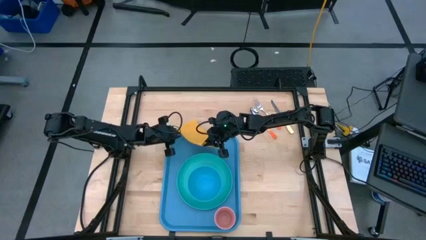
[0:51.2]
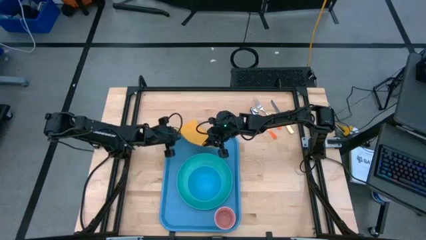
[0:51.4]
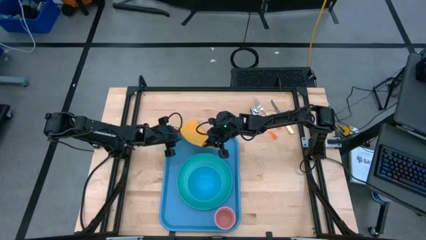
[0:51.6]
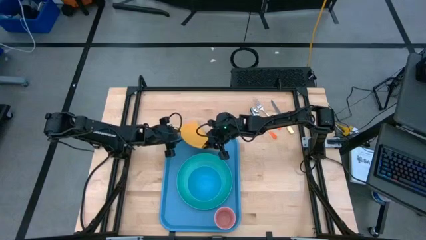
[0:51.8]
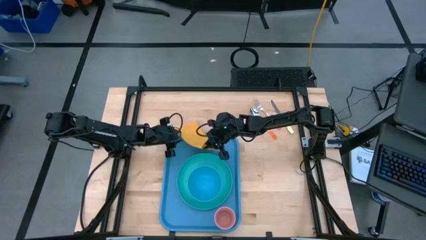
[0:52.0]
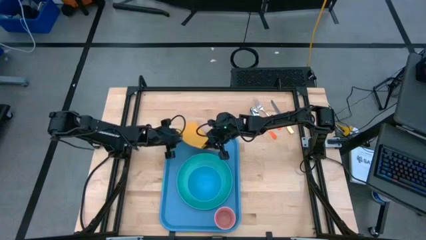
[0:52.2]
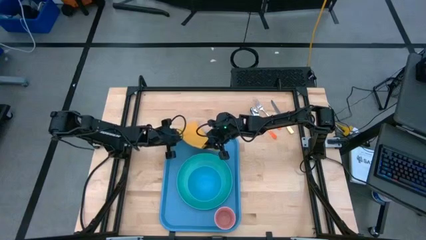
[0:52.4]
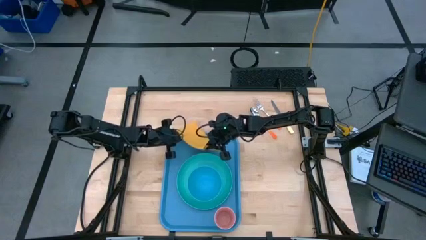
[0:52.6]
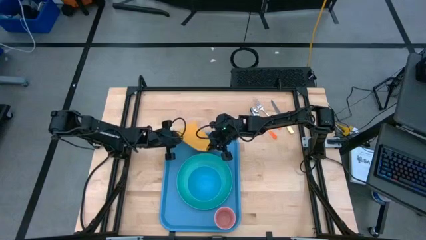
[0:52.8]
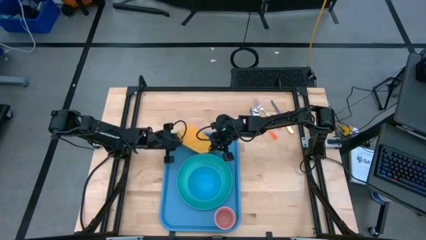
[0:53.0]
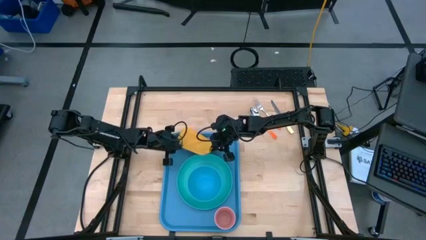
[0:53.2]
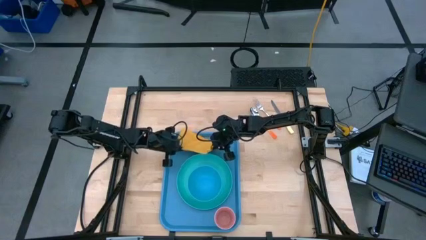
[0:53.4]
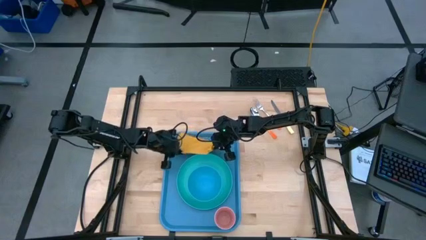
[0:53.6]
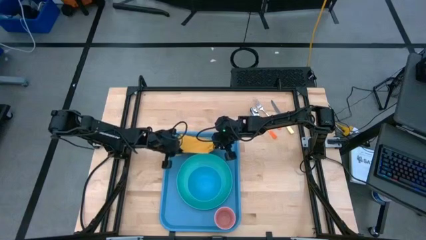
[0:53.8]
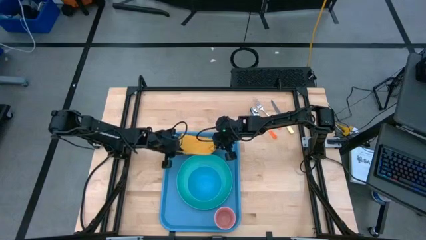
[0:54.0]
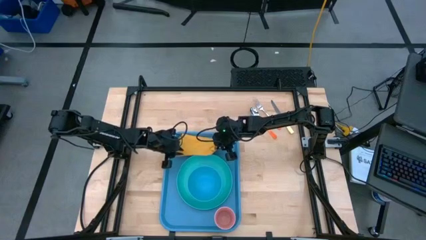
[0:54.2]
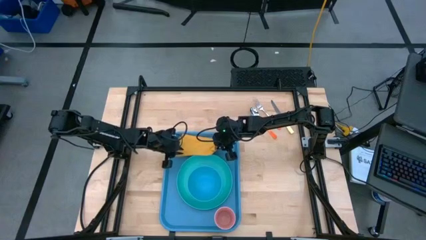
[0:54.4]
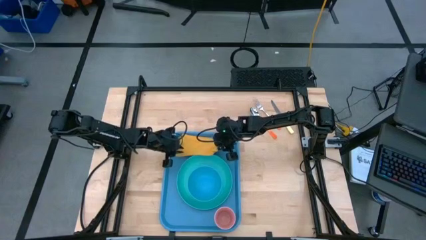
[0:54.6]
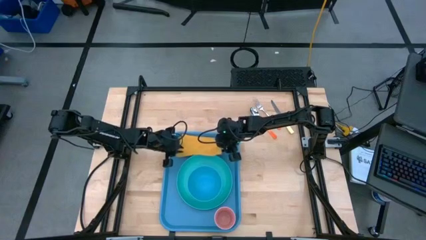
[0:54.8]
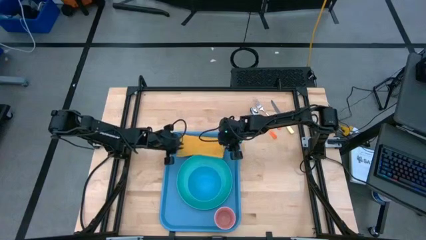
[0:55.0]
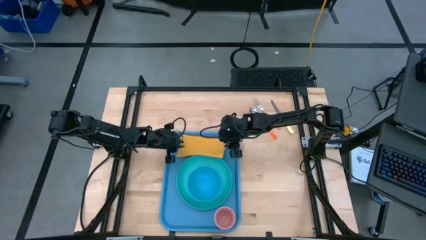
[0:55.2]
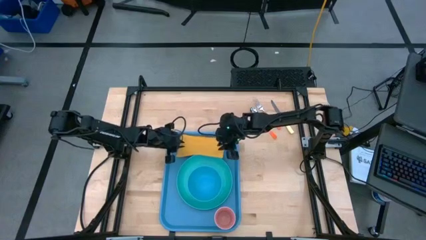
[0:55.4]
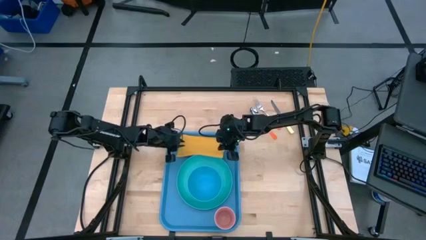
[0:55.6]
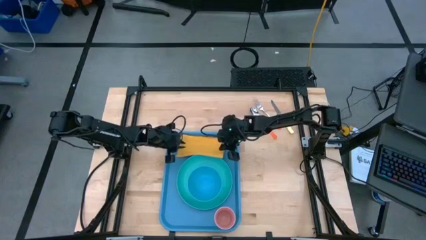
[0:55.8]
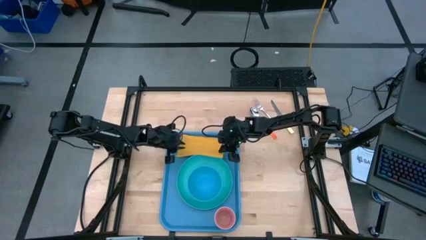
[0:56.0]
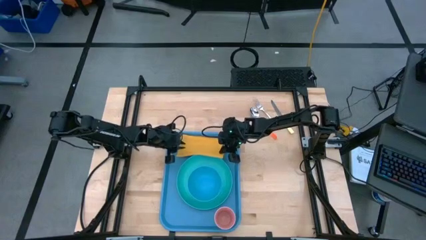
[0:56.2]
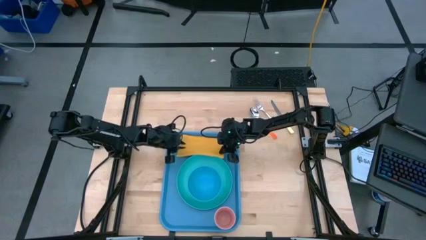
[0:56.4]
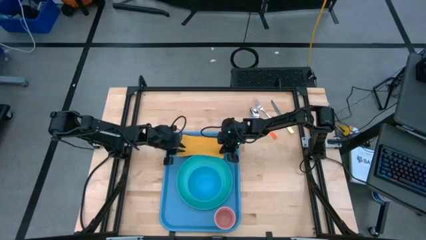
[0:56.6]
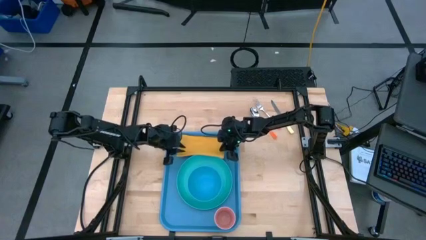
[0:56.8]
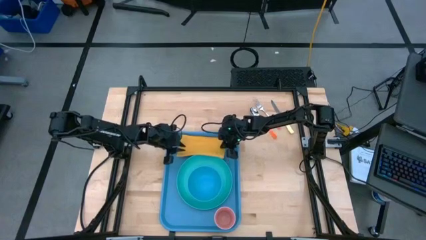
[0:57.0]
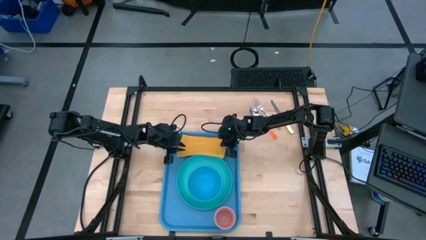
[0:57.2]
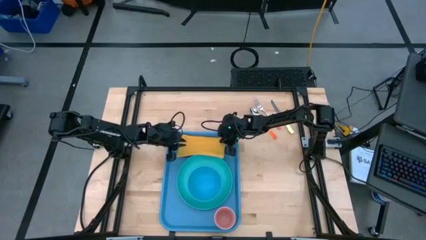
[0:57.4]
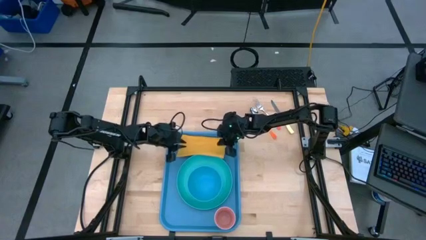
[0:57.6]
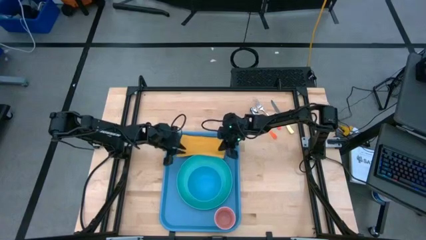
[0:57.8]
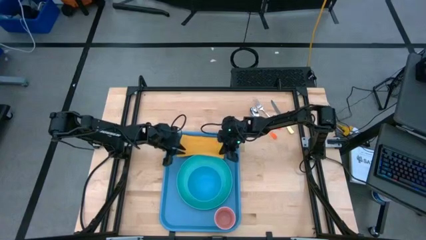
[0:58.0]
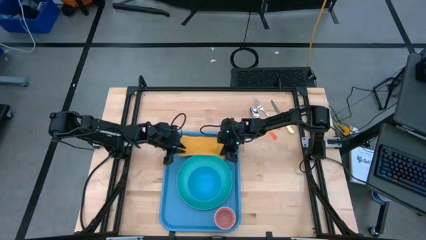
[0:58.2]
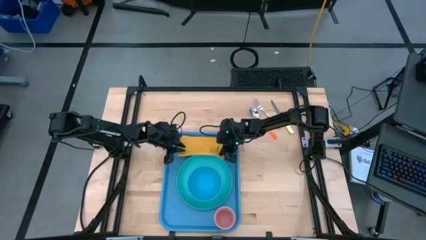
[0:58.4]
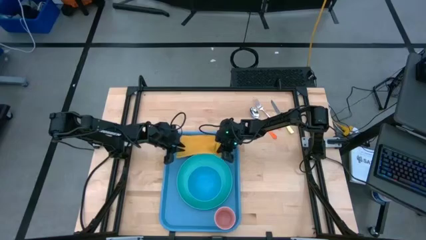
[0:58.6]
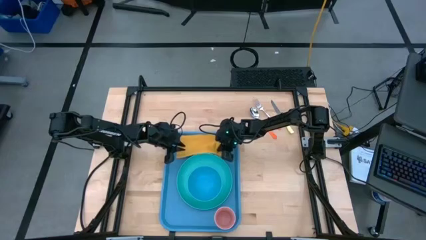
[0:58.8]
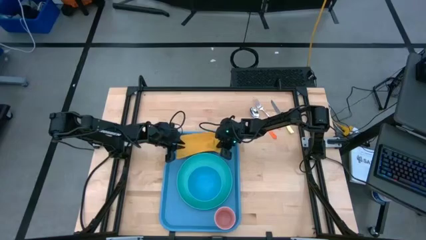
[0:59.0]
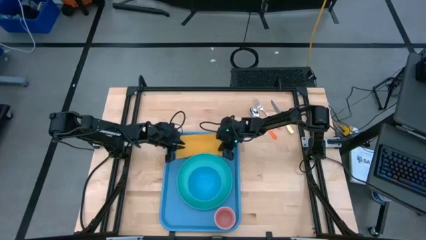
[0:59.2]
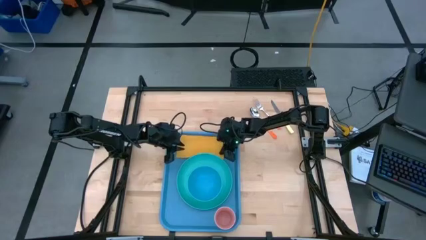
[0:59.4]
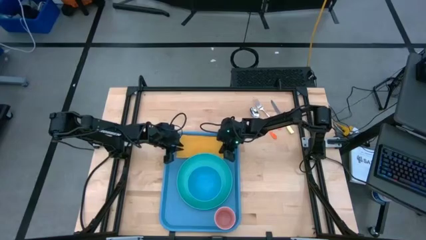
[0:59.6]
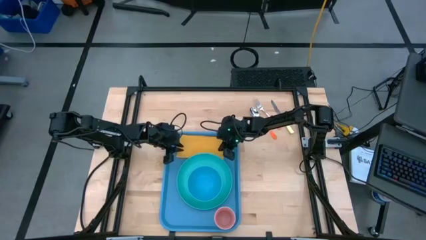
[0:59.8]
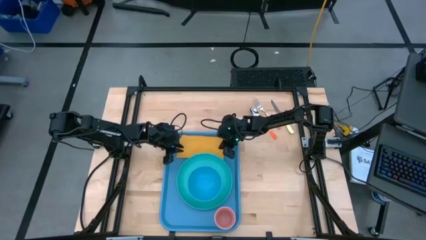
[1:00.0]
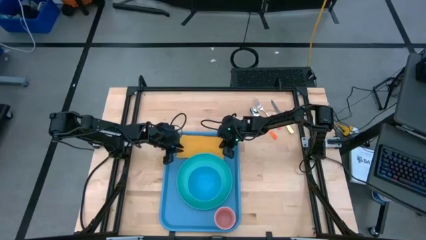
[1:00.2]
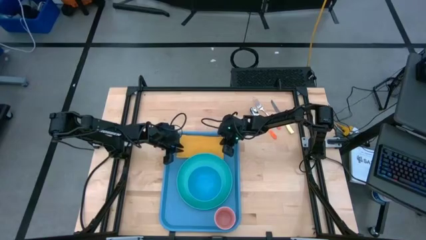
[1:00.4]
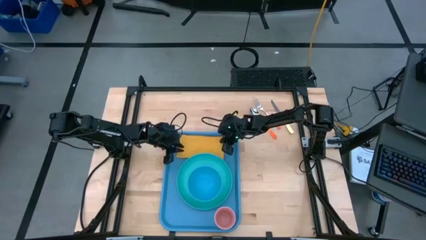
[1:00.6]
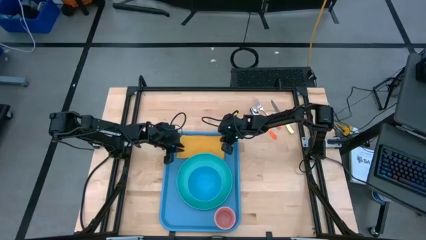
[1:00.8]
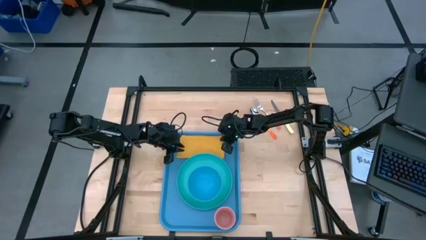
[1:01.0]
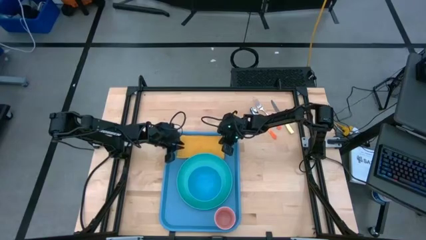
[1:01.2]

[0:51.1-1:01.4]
Task: Set up tray
Put the orange napkin on the blue tray to the top of the light blue plate

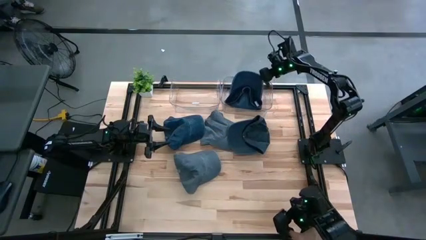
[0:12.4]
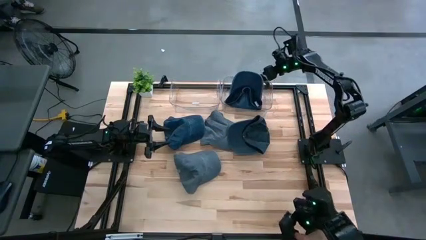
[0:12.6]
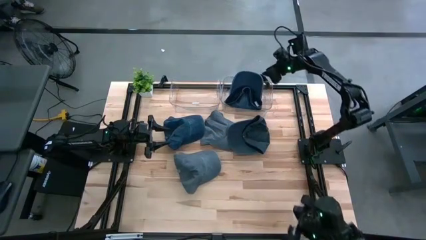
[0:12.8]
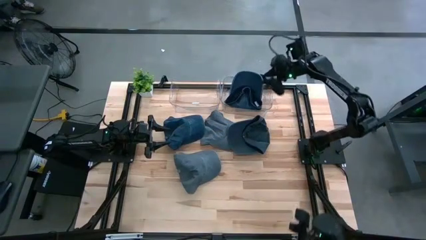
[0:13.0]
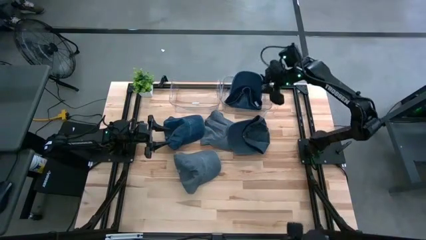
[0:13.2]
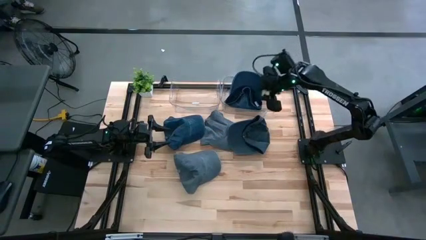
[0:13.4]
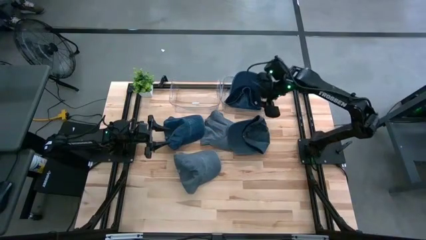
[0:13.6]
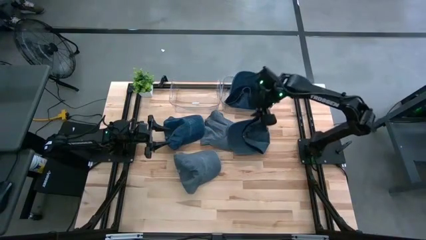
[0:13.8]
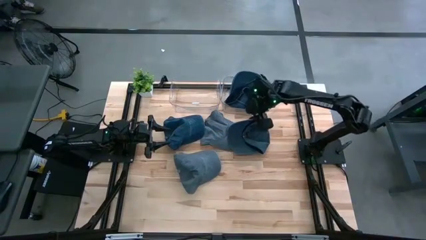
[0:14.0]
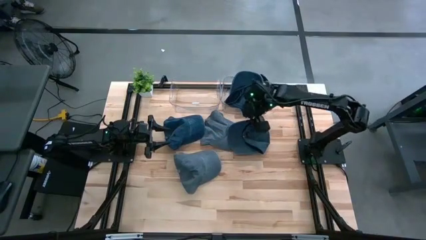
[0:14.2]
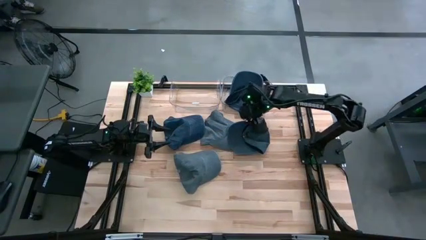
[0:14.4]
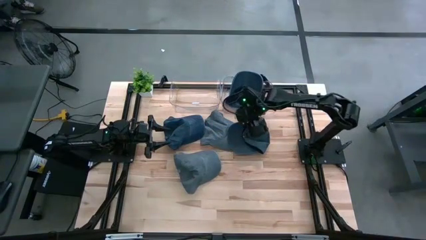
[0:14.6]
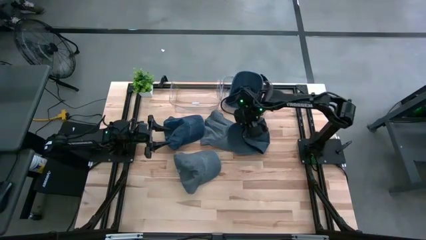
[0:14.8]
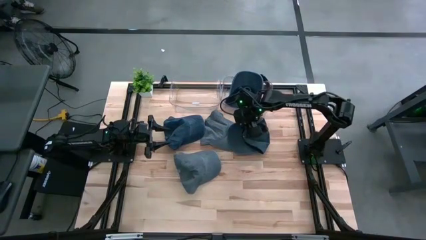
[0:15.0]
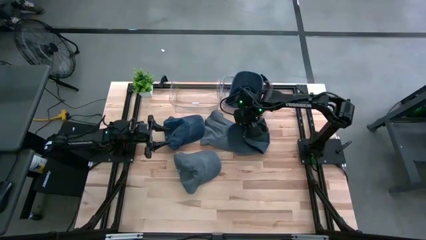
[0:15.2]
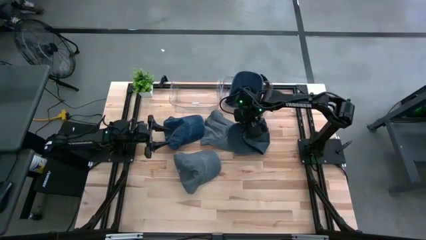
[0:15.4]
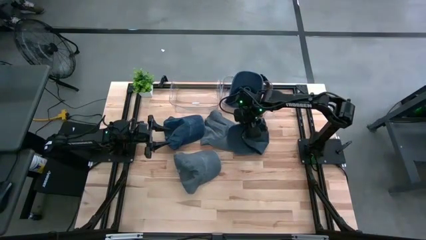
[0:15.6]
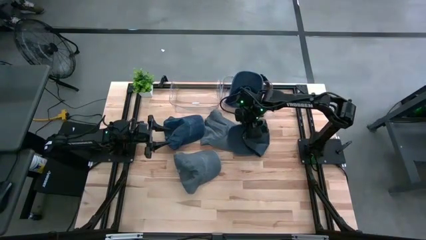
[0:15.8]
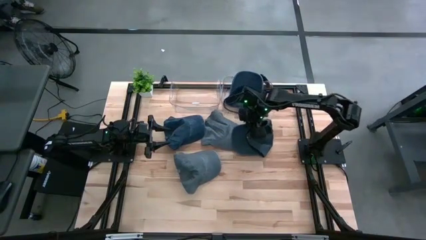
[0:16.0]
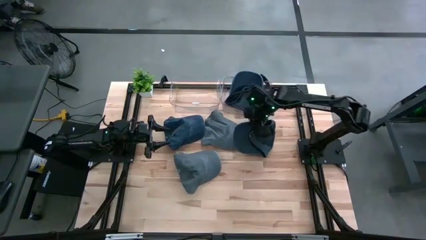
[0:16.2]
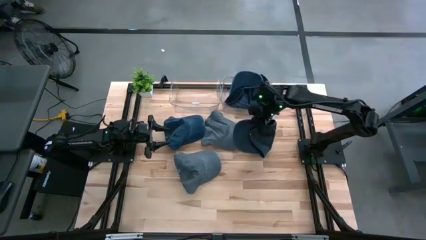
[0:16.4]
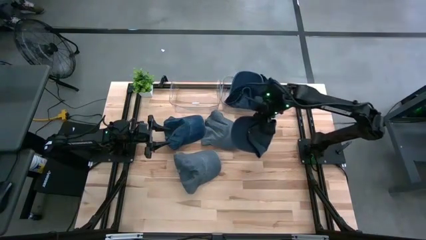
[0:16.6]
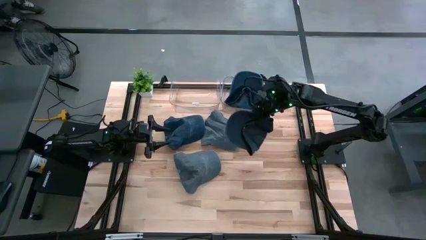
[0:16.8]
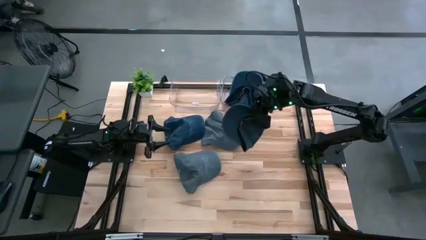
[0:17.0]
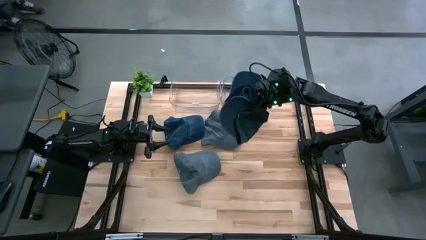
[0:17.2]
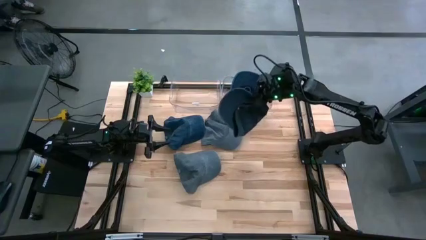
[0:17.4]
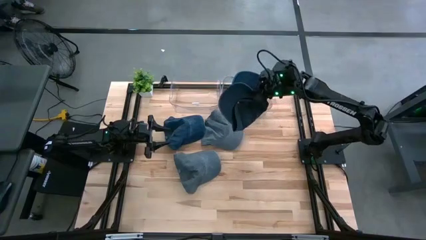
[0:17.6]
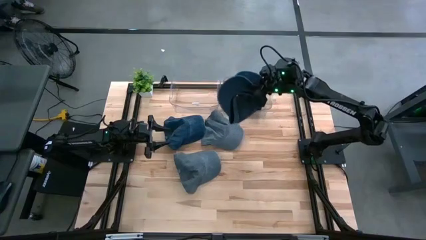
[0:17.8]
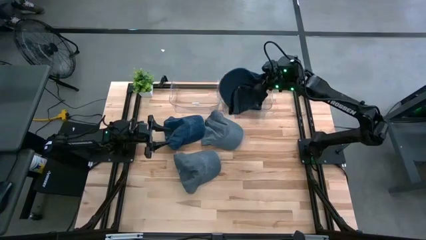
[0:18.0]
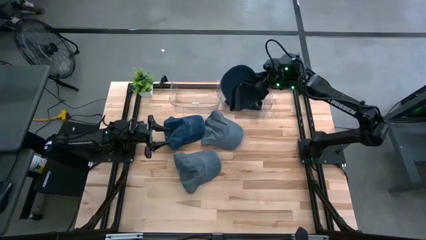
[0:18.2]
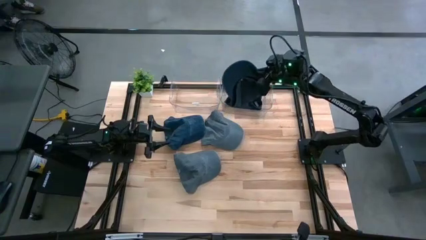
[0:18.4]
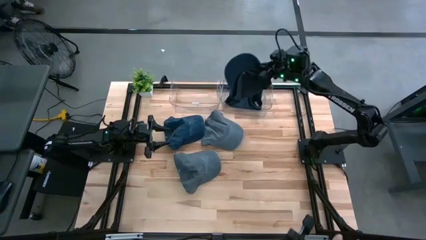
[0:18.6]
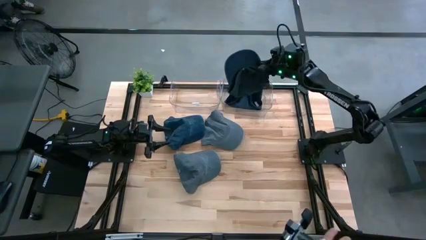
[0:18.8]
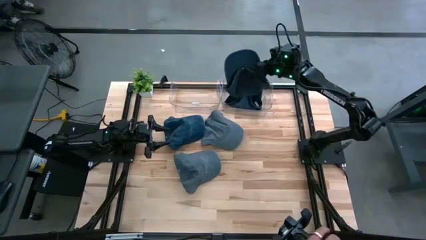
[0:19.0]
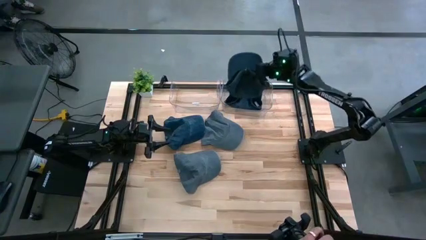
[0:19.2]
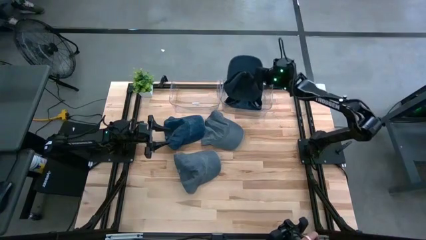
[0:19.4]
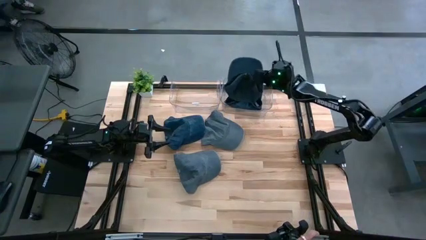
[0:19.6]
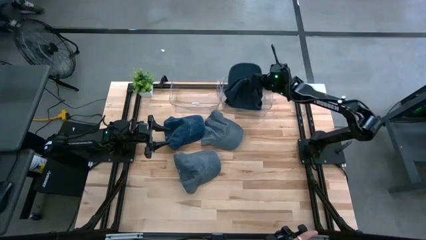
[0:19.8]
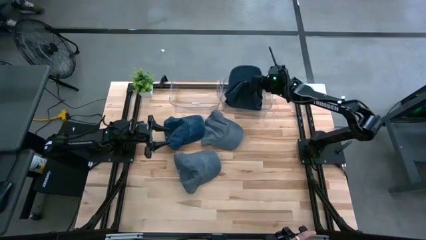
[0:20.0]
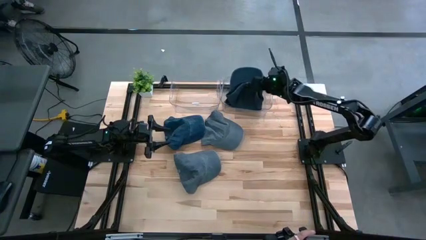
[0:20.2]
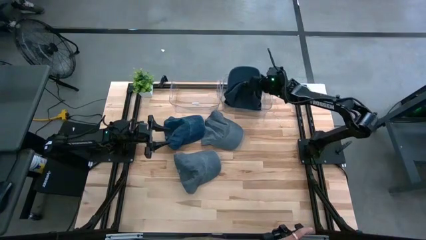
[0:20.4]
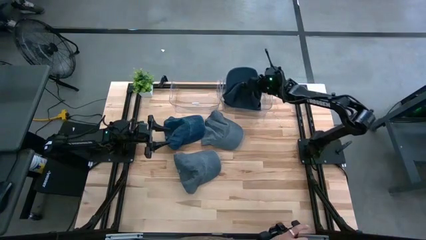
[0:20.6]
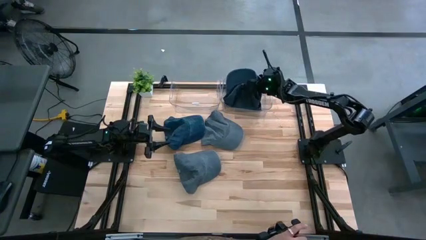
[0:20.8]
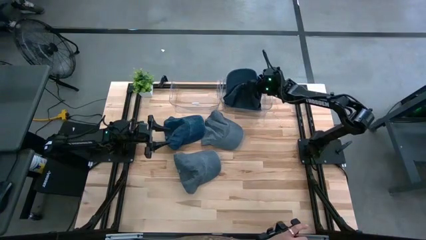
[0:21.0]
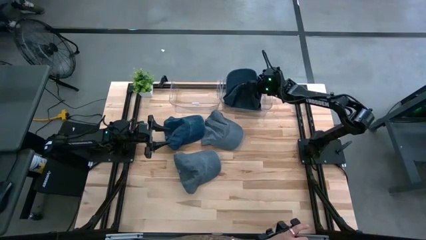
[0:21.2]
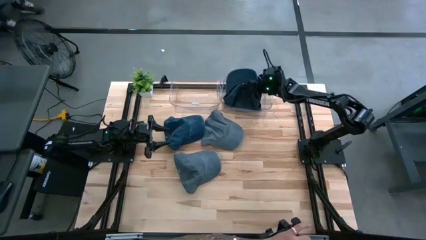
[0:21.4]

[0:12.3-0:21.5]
Task: Pick & Place hat
Put the right blue cap into the right transparent bin
